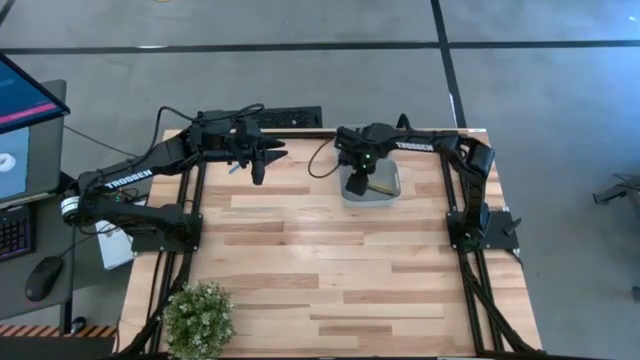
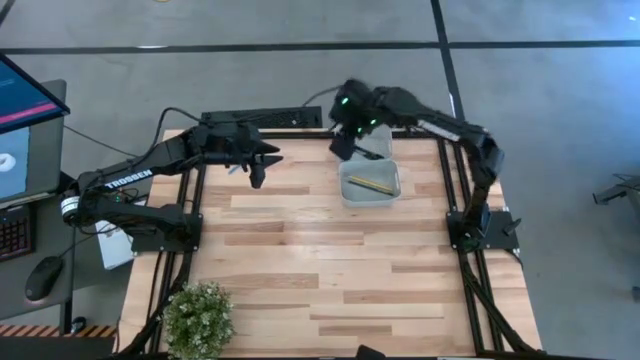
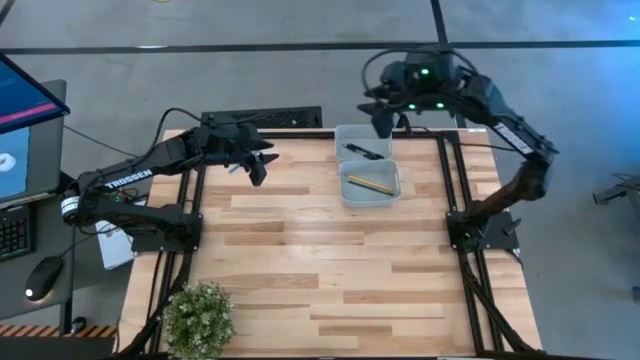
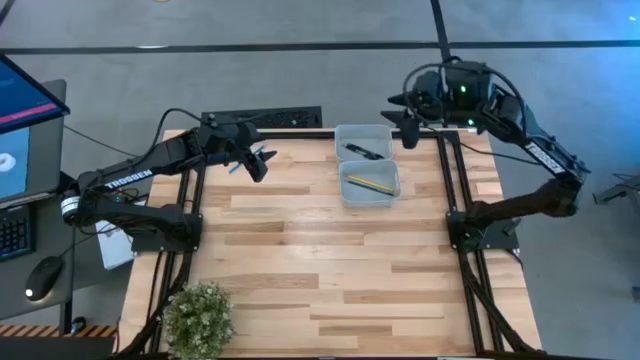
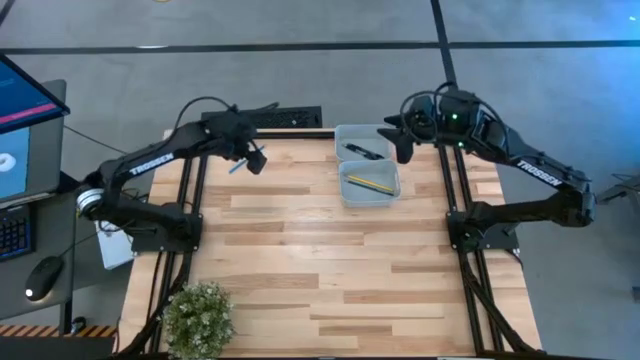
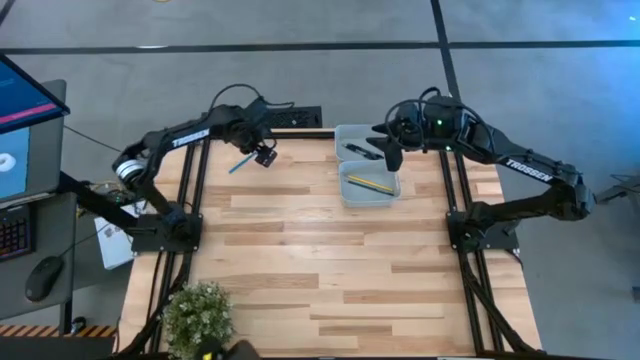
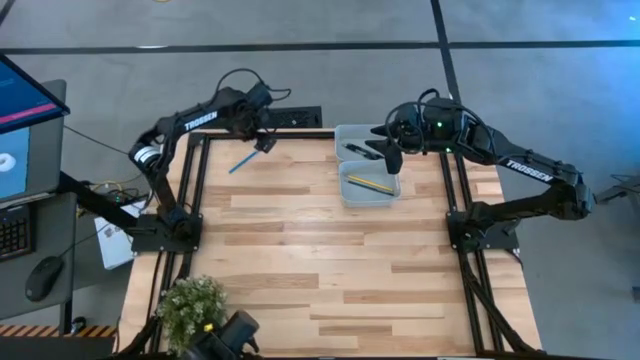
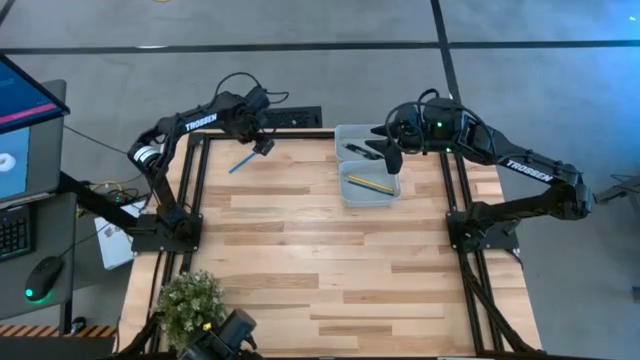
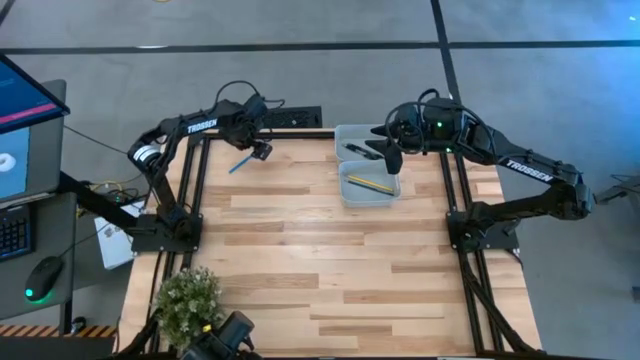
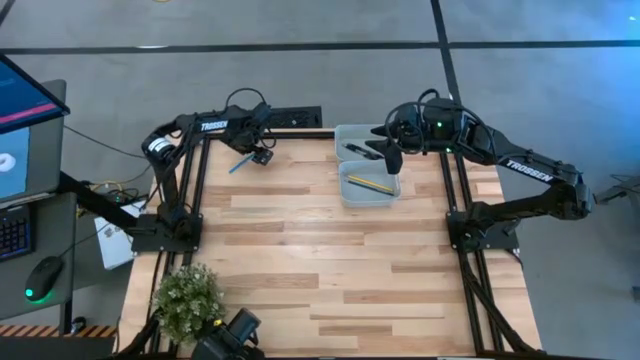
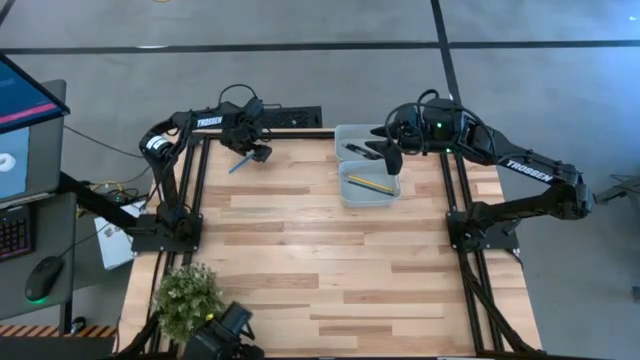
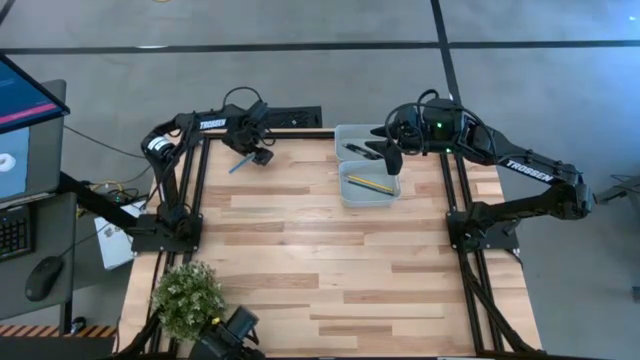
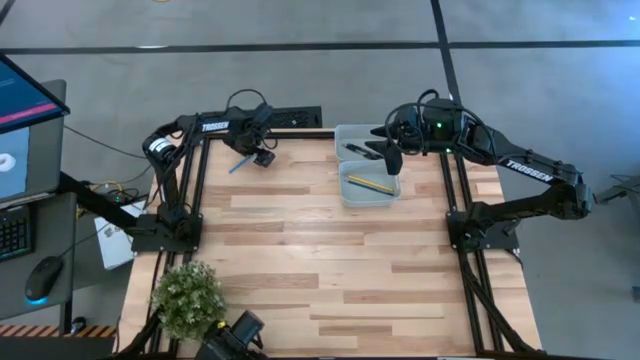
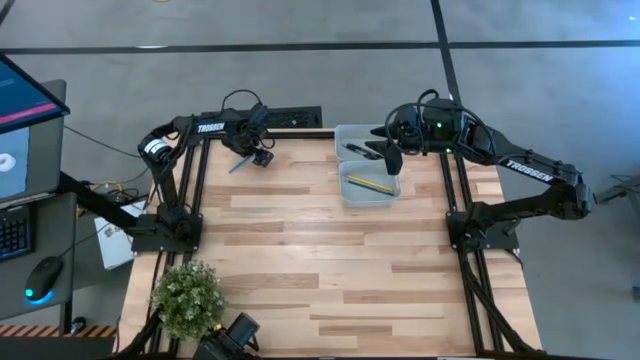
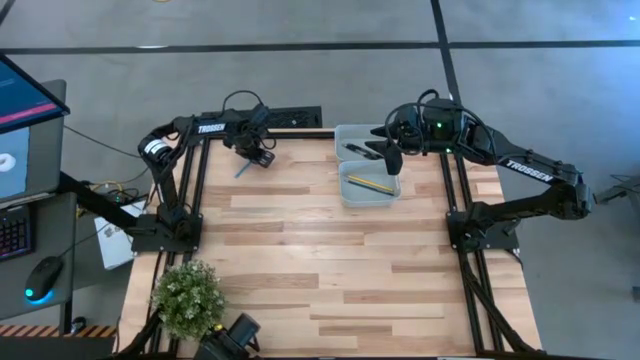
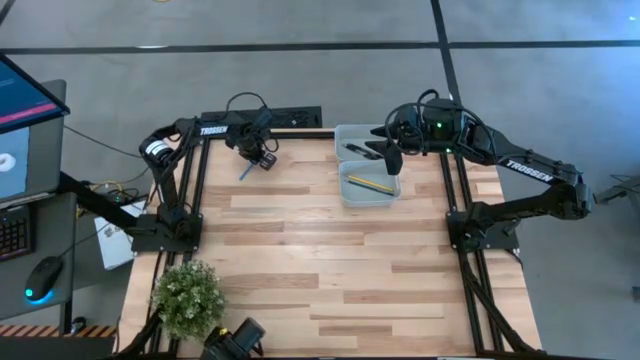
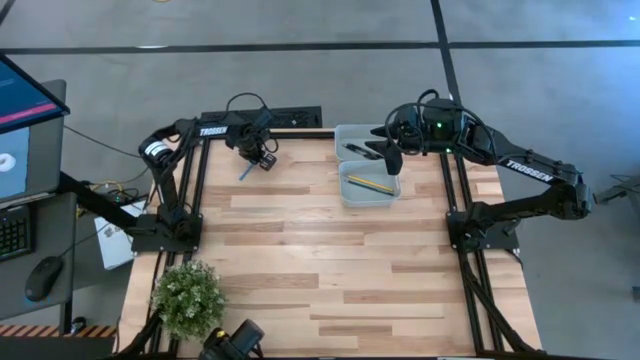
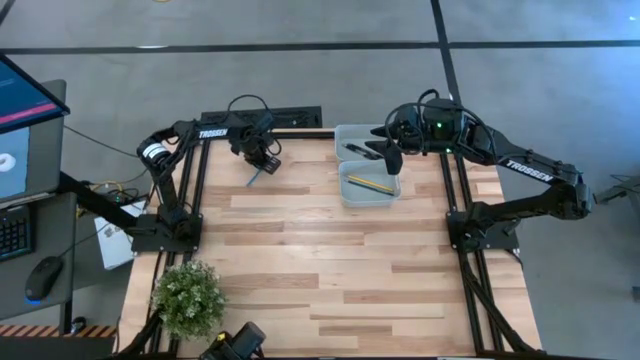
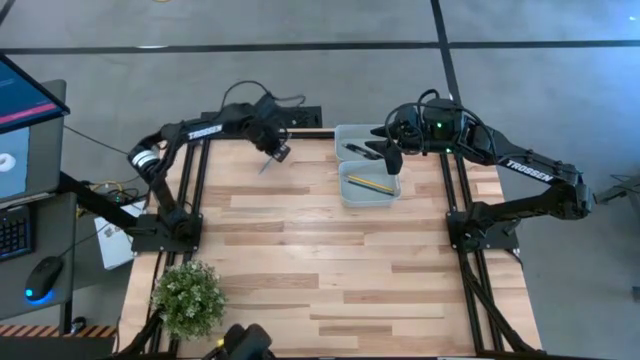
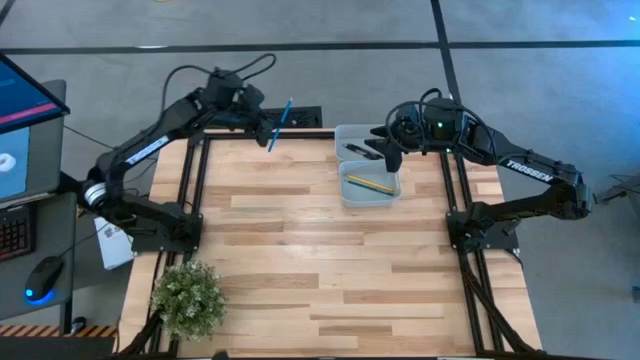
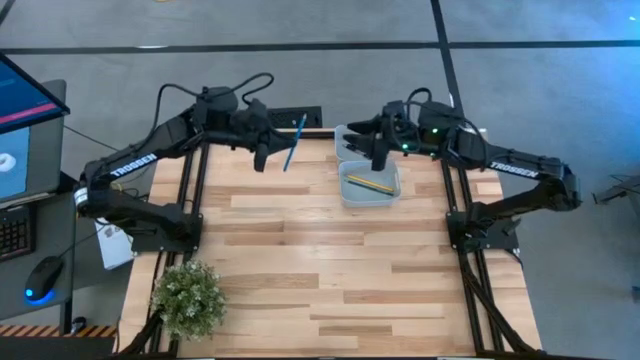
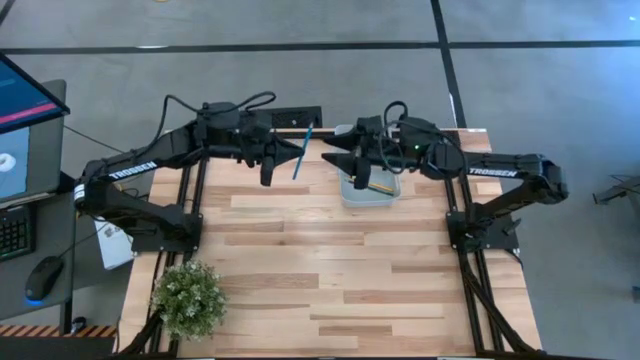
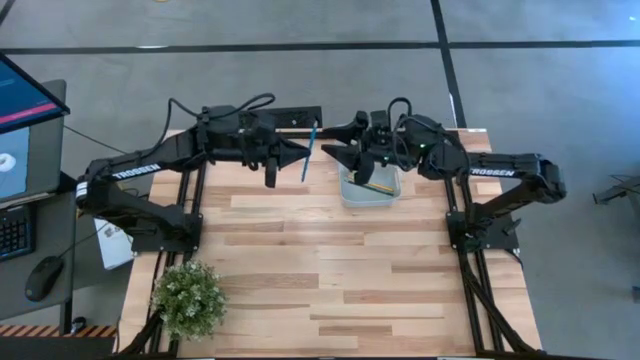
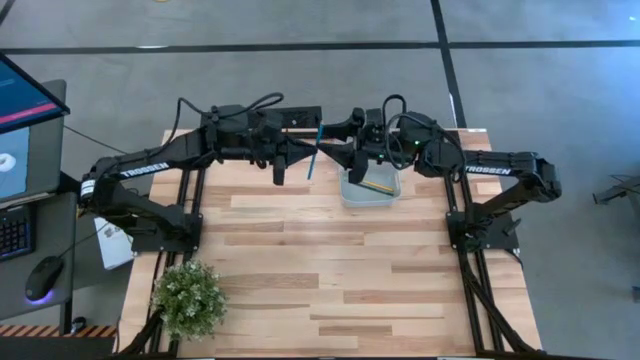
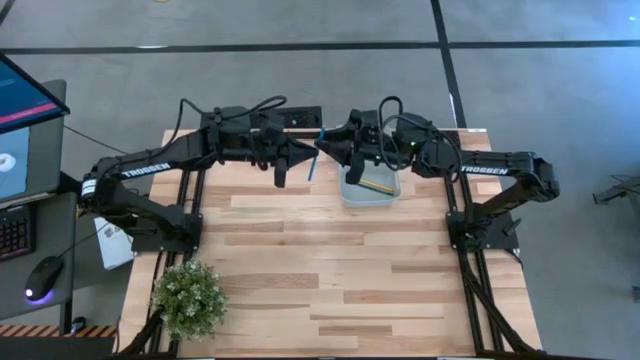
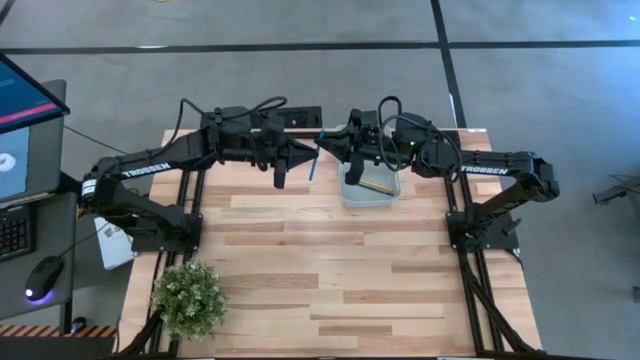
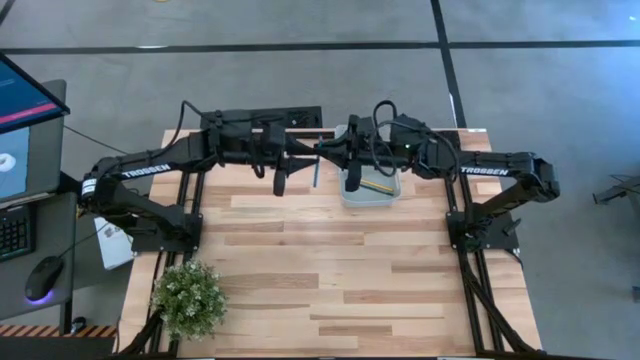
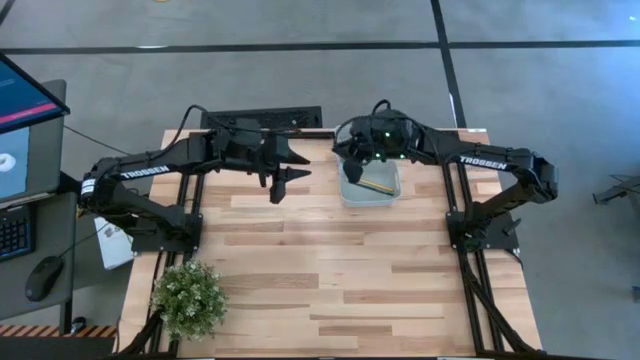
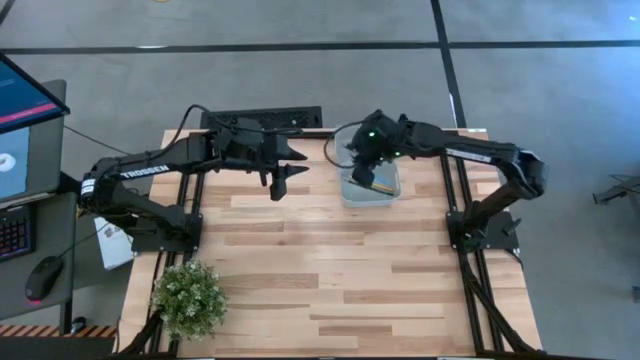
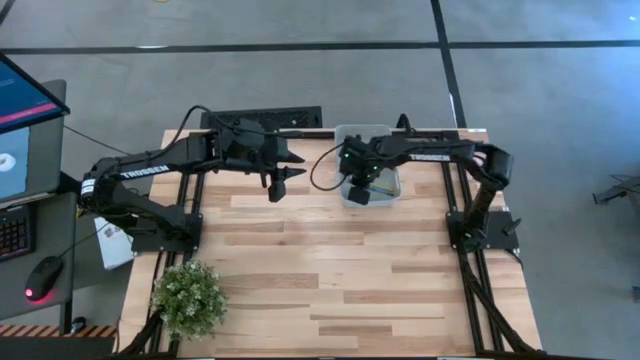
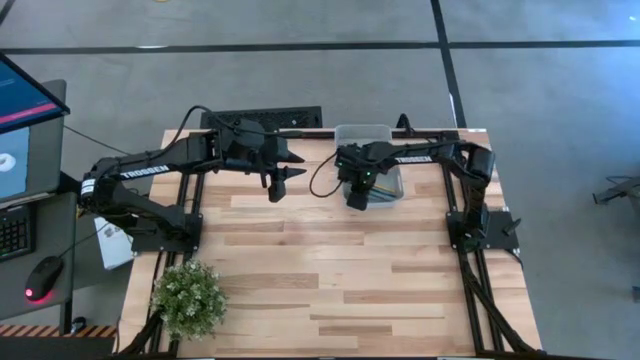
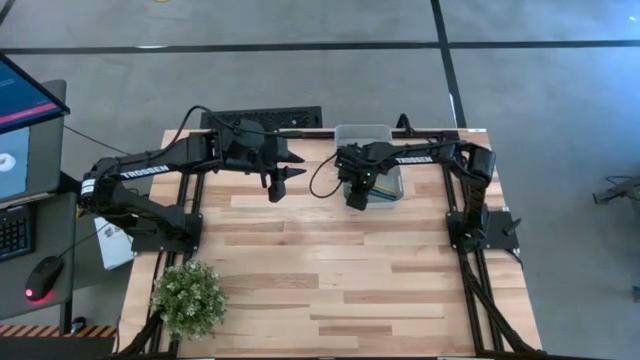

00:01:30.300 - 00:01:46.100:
Task: Sort pens & pencils
Put the blue pencil into the bottom bin

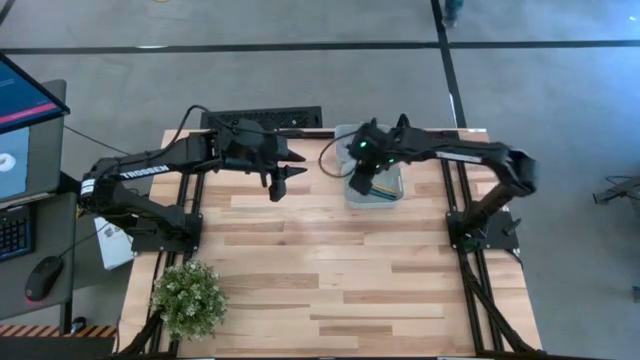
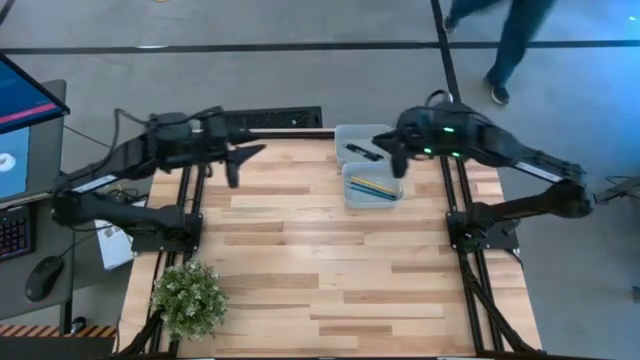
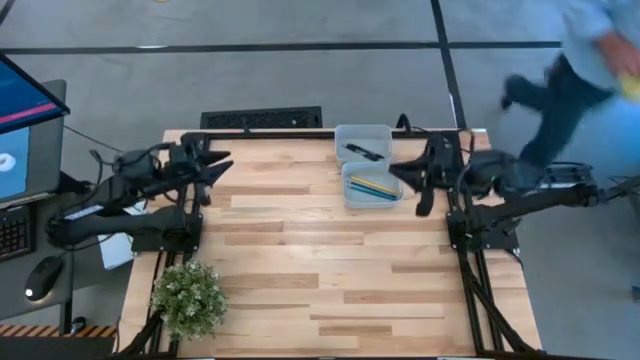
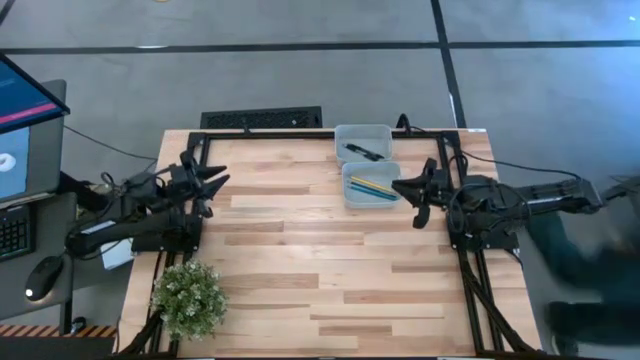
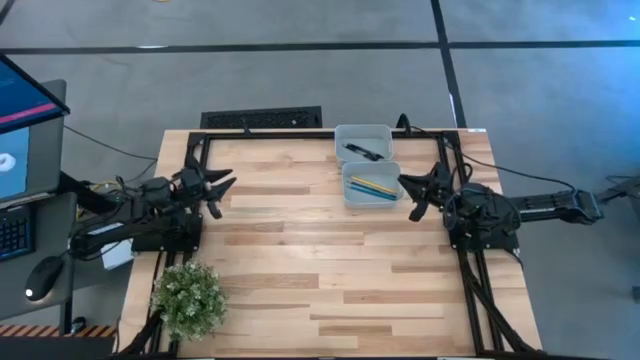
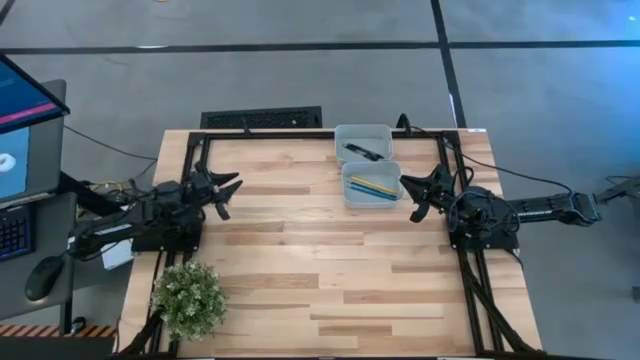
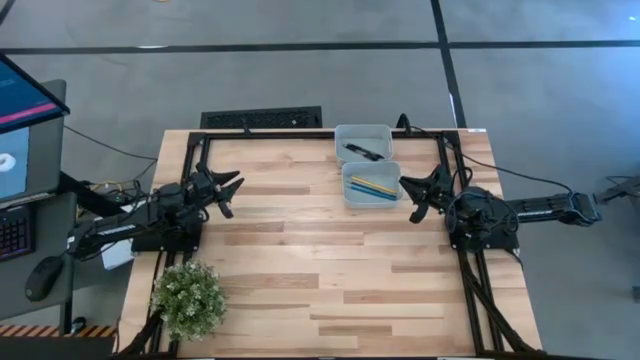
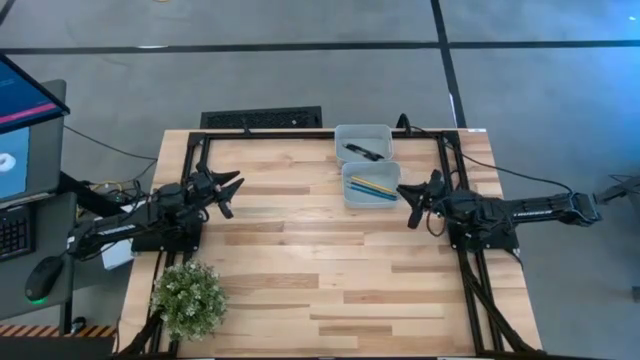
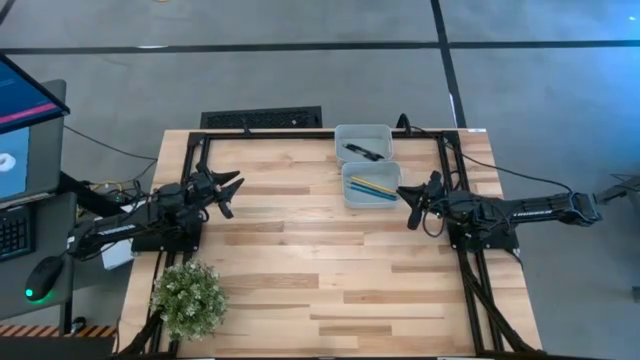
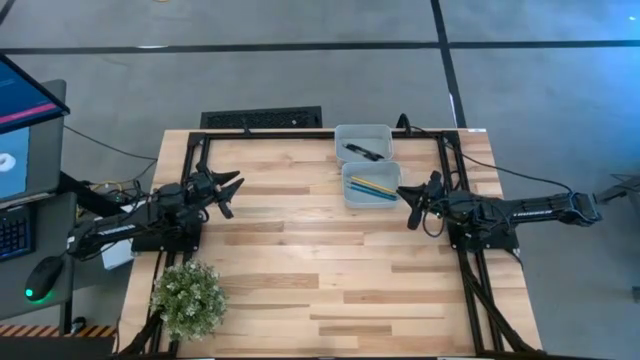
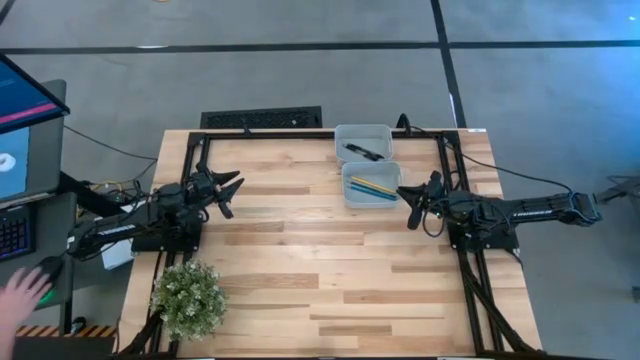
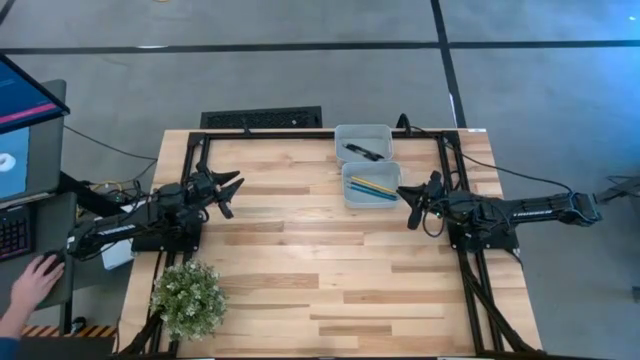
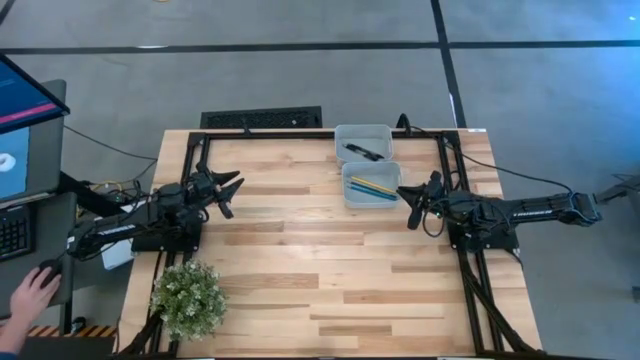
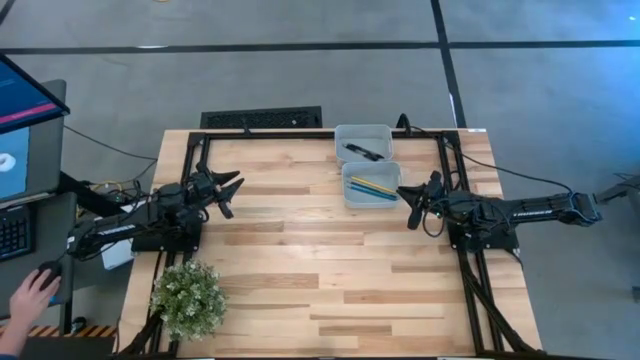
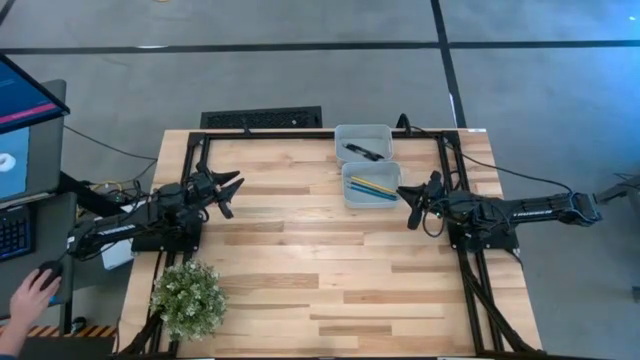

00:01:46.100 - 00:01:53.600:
Return to Home Position
